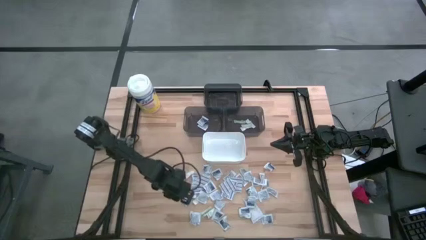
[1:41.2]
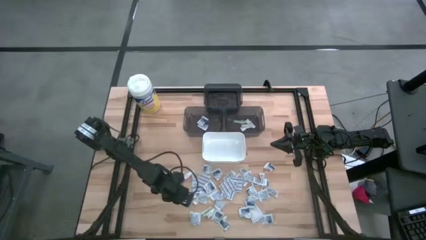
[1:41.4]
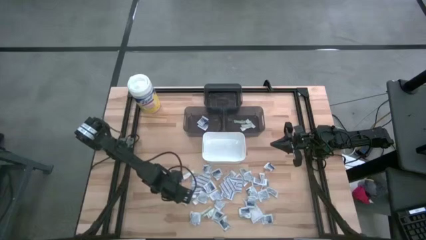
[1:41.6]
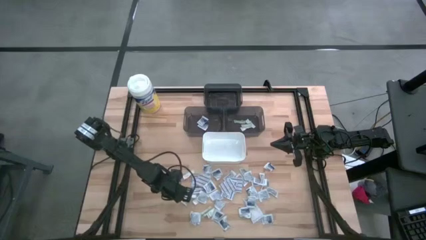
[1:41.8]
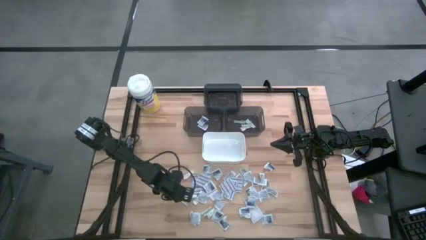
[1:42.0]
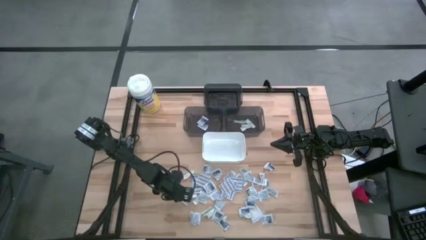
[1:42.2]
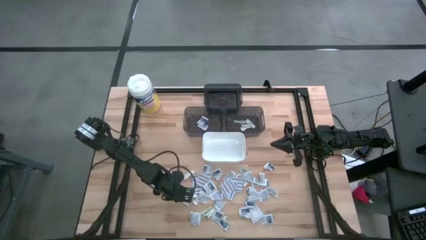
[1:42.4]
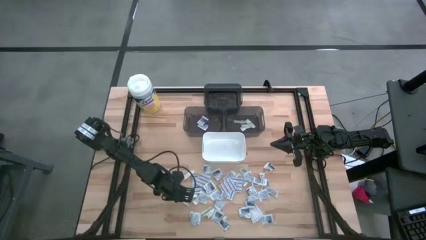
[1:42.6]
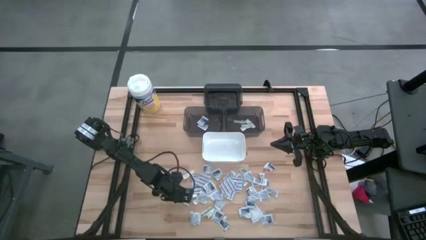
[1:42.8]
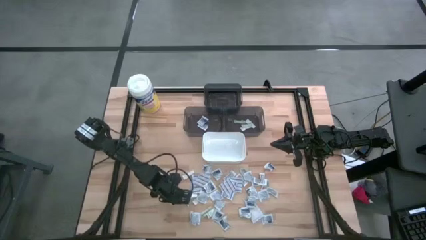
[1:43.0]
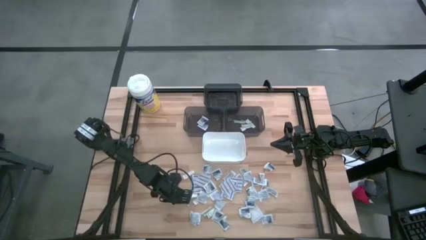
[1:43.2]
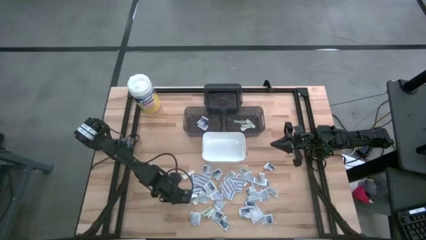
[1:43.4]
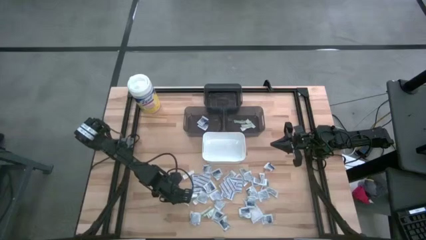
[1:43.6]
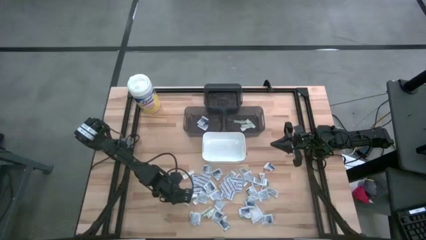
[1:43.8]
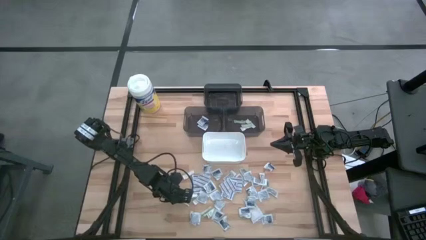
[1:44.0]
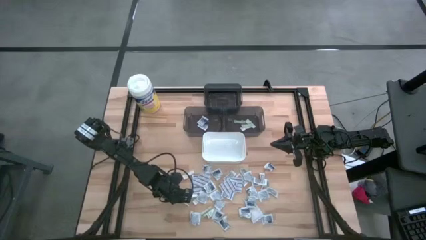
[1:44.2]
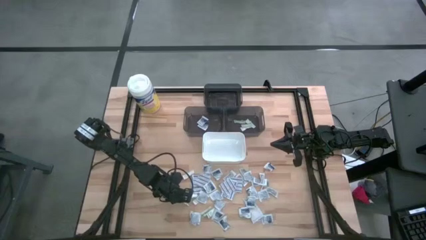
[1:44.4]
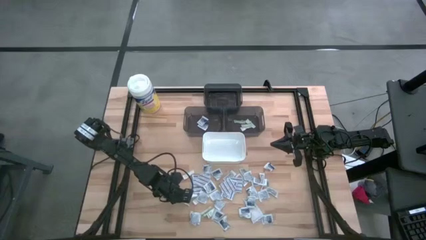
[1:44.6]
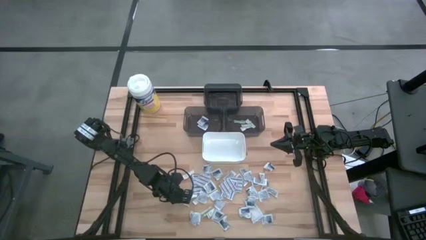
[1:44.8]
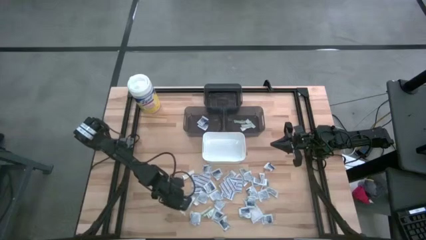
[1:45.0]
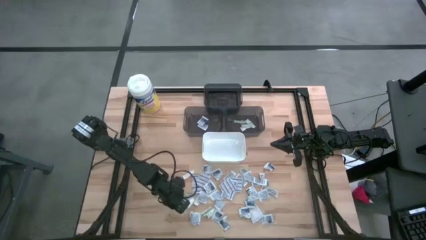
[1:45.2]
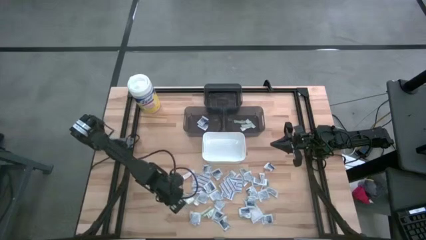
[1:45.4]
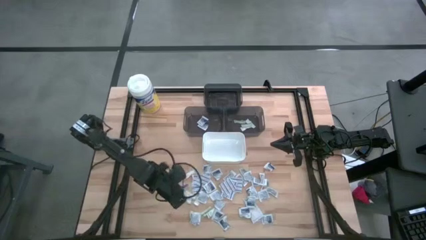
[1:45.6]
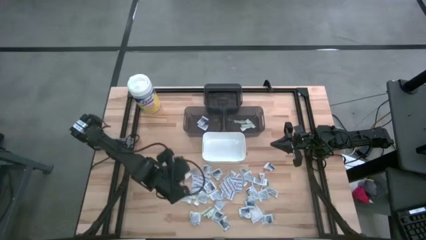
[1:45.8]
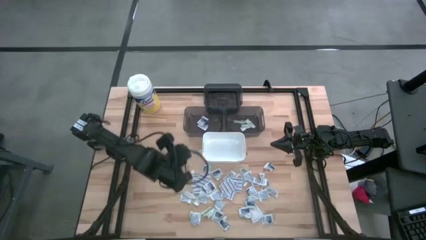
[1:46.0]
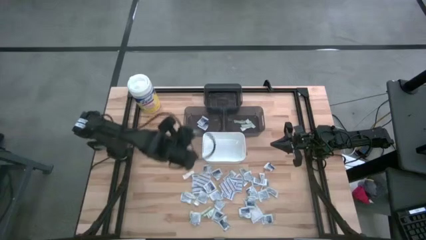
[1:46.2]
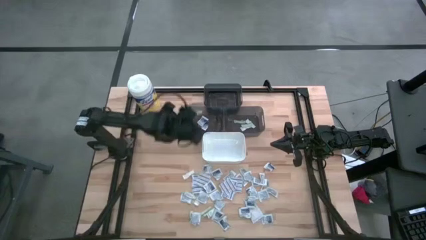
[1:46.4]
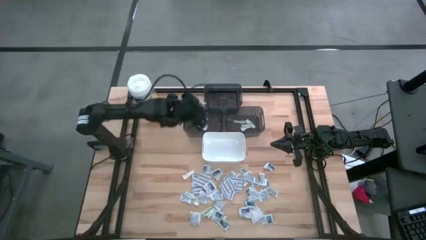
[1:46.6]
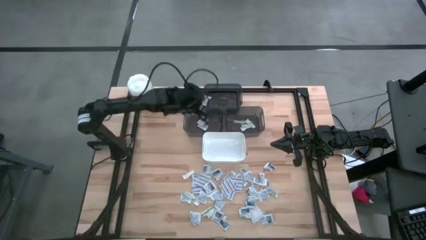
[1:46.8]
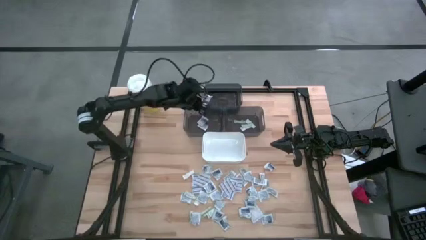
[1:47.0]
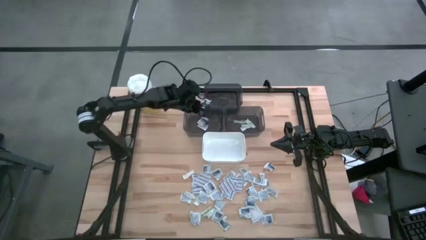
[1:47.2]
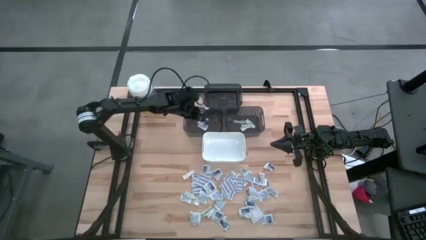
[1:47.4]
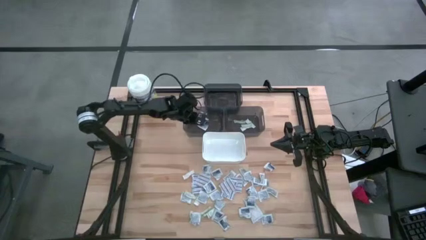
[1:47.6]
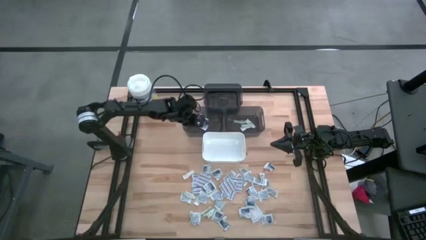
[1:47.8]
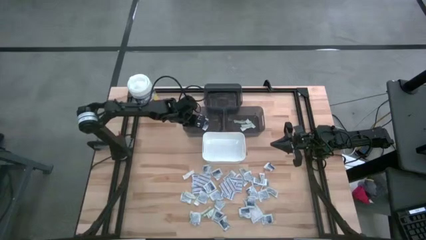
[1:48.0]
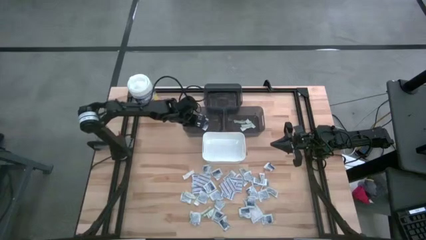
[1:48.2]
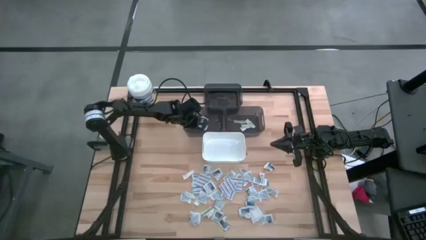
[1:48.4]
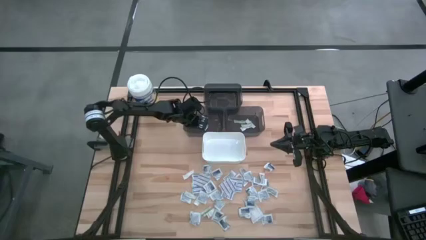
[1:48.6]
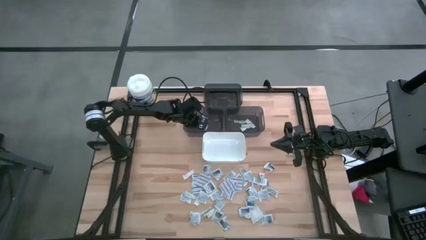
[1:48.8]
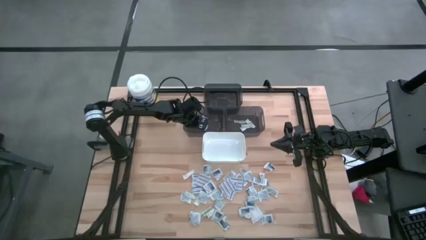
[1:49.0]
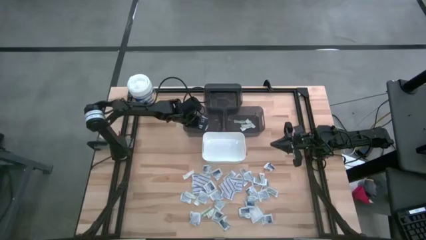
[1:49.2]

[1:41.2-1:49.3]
Task: Pick & Place First Aid Supplies
Put the alcohol pad into the bottom left black bin

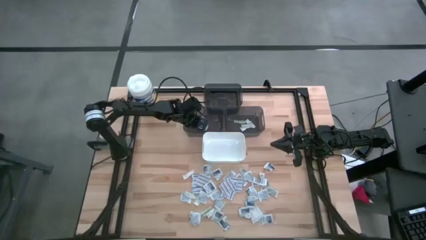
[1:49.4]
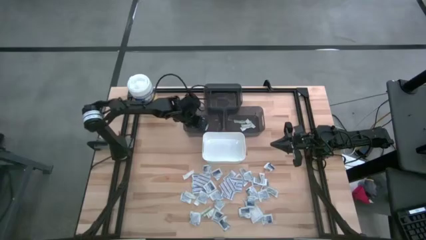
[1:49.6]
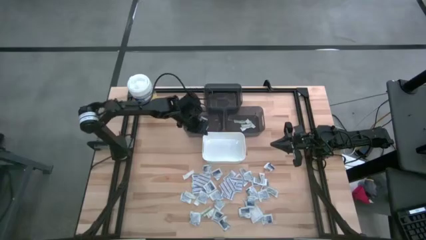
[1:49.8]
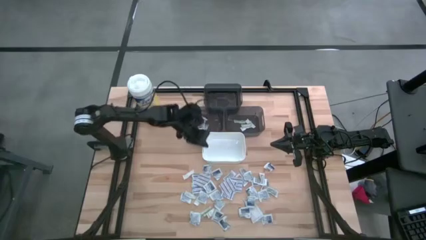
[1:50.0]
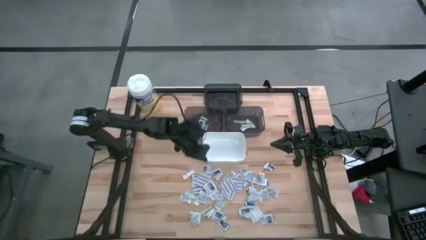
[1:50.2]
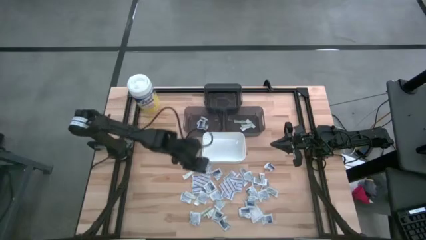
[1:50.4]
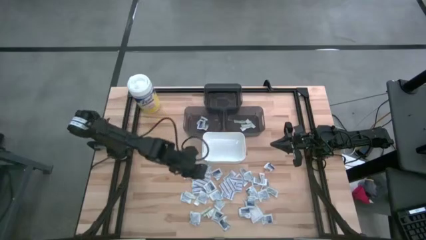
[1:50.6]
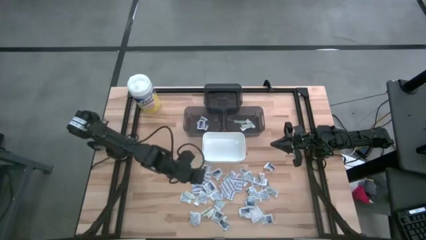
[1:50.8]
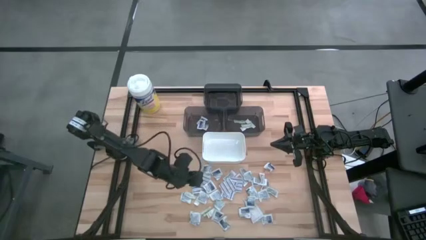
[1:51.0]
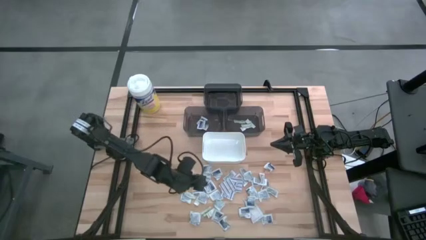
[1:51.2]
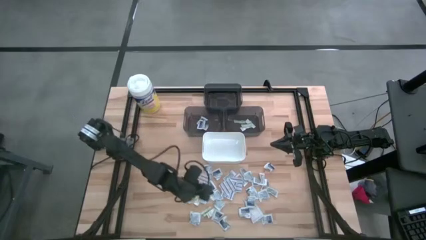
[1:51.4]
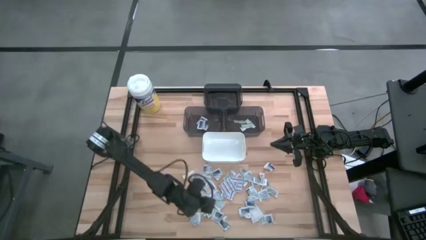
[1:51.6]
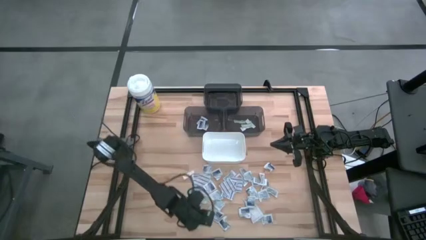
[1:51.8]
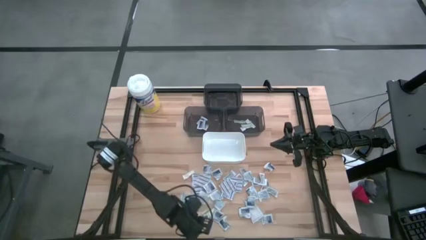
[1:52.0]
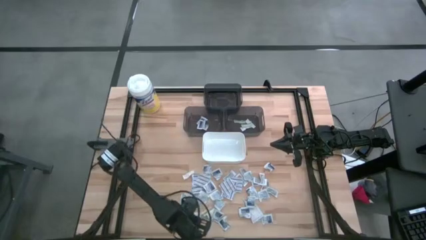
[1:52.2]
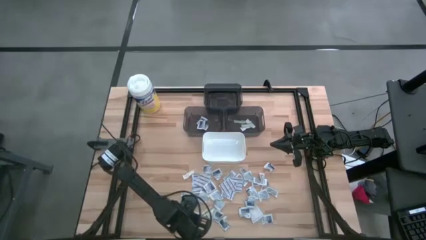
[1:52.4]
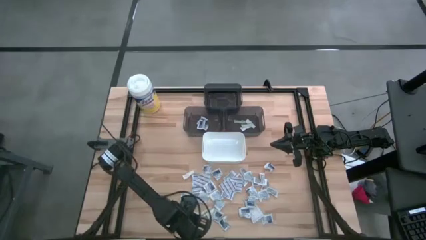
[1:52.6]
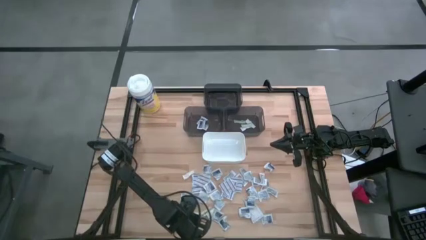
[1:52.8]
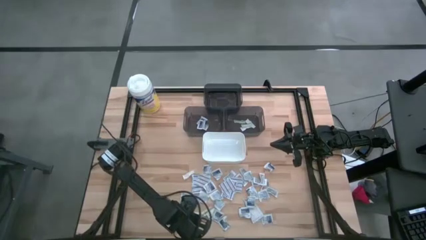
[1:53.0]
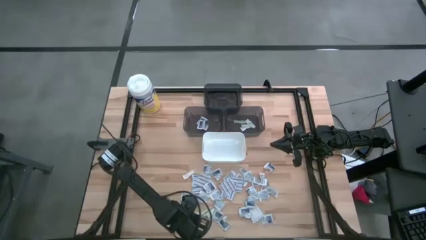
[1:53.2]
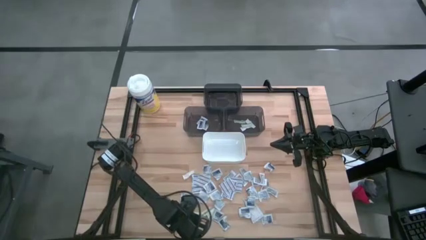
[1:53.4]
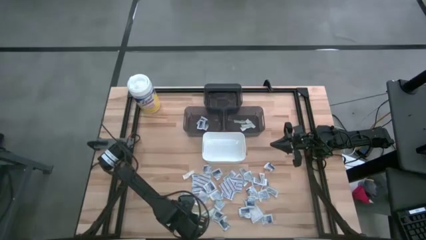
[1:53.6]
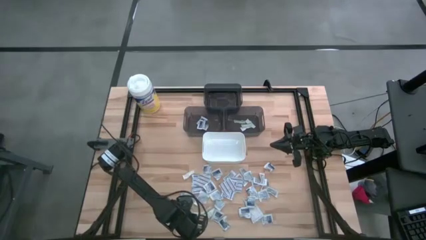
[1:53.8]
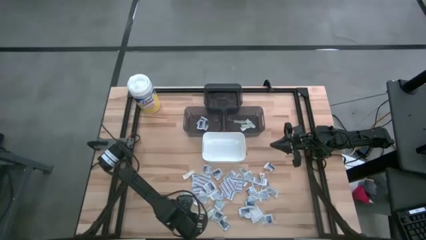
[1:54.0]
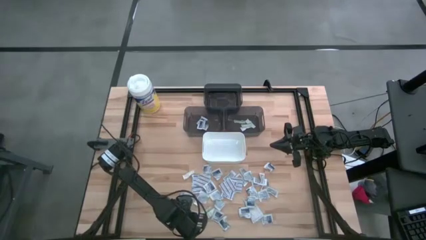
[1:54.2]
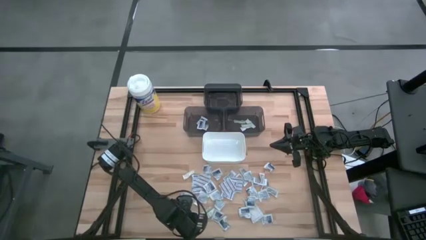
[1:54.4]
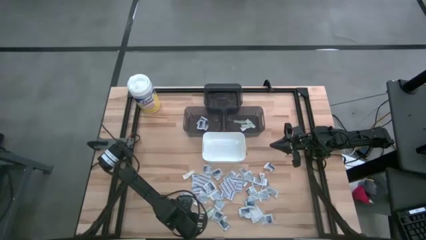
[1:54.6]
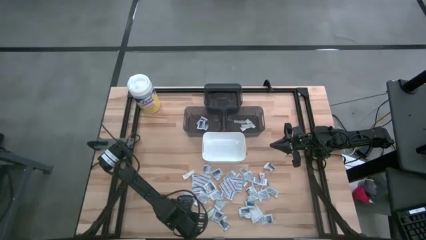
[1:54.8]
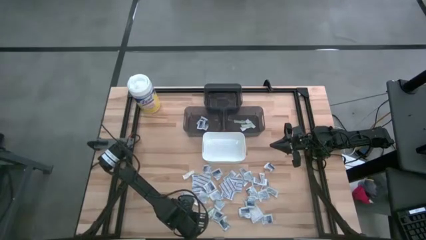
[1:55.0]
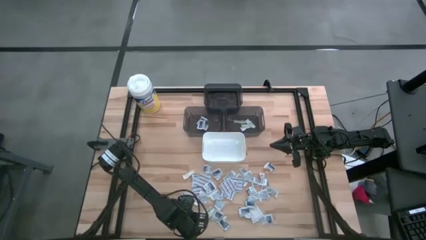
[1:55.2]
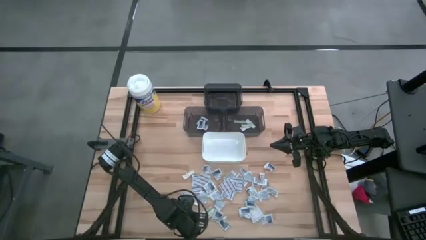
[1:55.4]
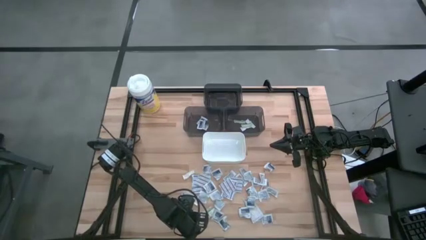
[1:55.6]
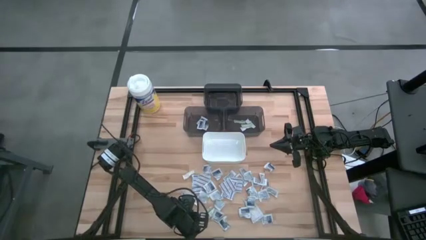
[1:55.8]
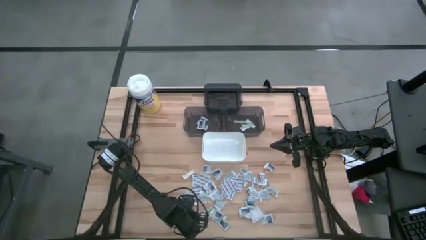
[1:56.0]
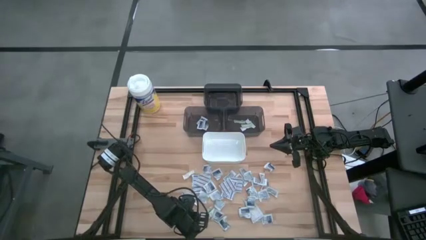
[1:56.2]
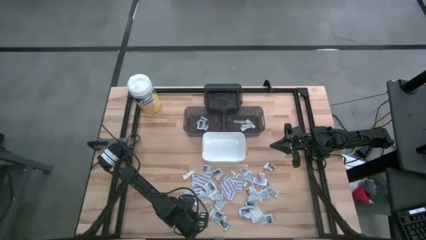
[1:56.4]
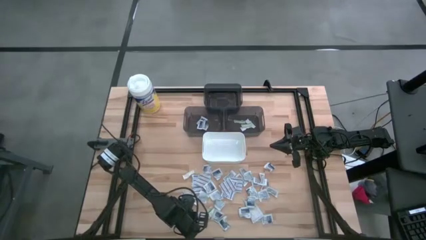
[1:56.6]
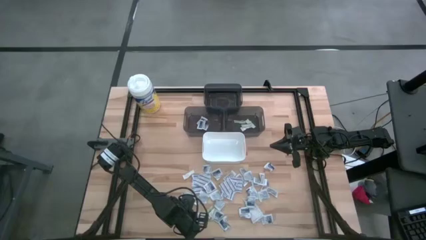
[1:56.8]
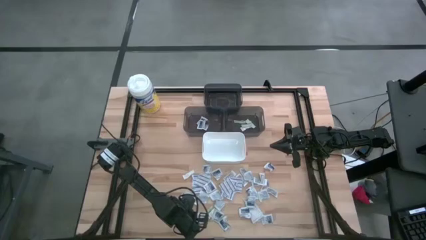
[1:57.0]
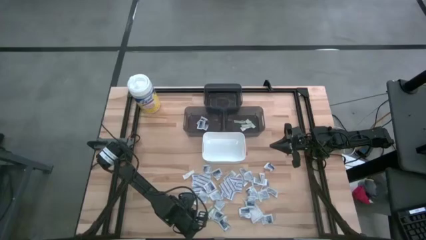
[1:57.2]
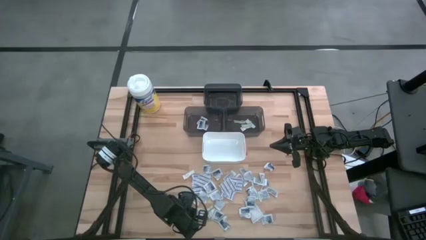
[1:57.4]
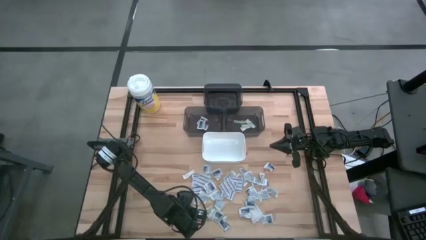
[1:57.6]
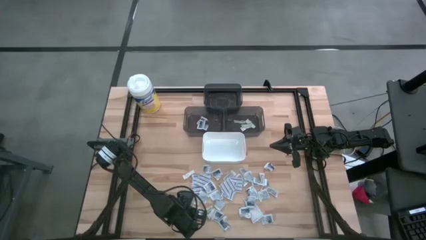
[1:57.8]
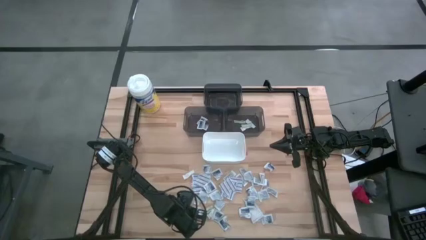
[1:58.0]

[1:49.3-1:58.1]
Put the alcohol pad into the bottom left black bin
